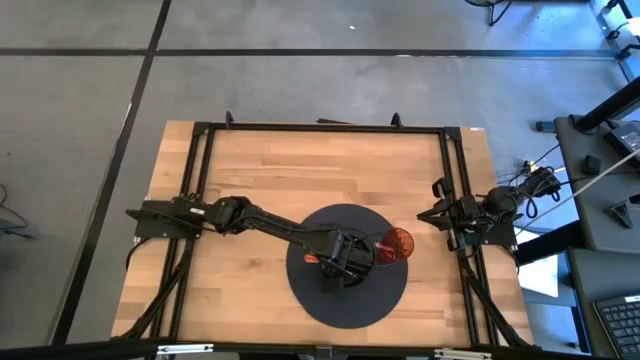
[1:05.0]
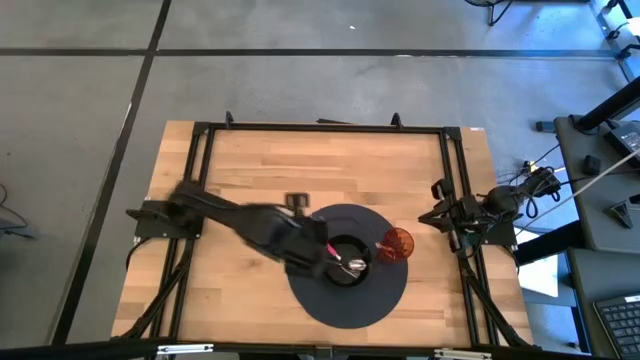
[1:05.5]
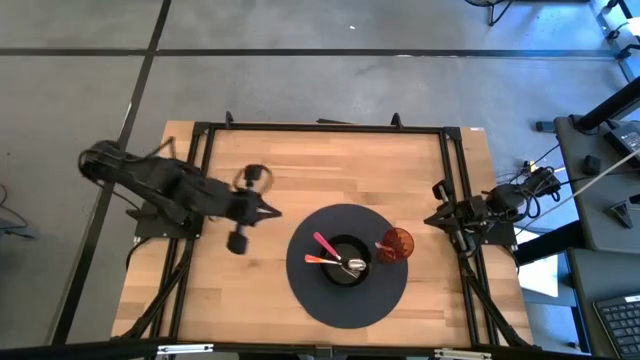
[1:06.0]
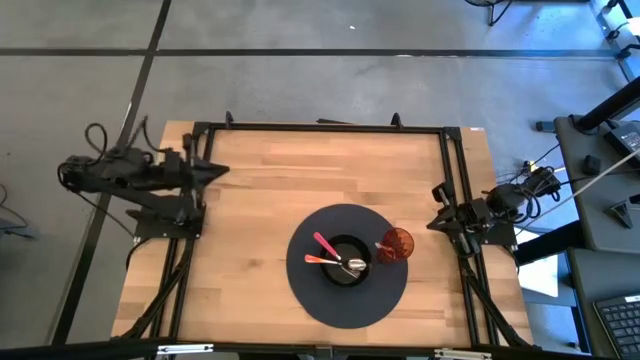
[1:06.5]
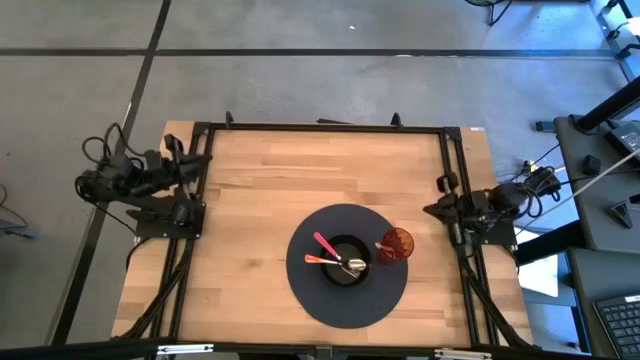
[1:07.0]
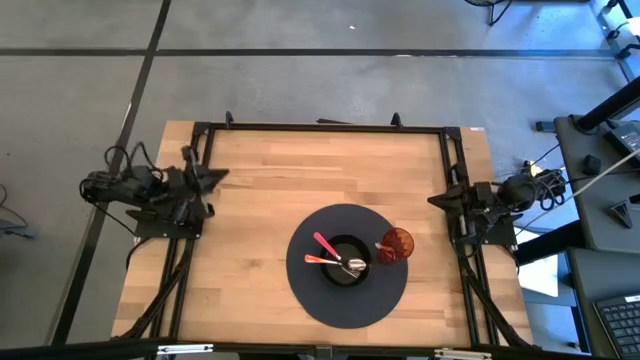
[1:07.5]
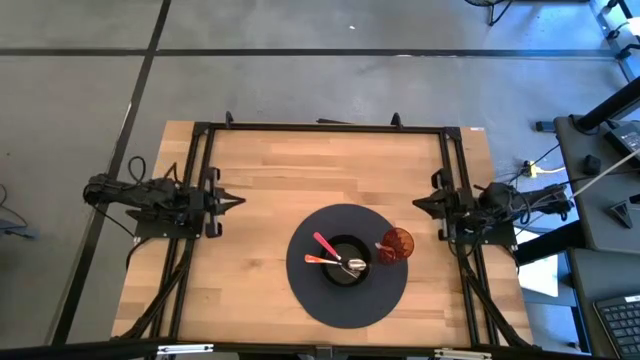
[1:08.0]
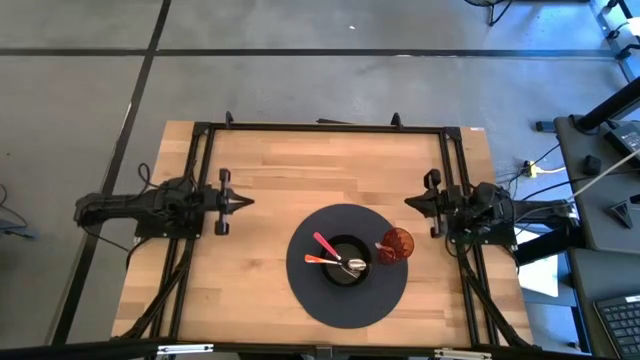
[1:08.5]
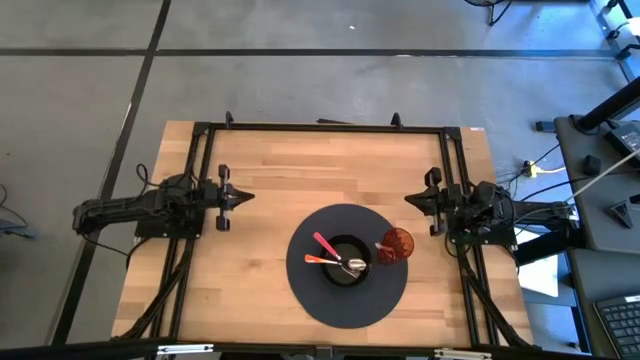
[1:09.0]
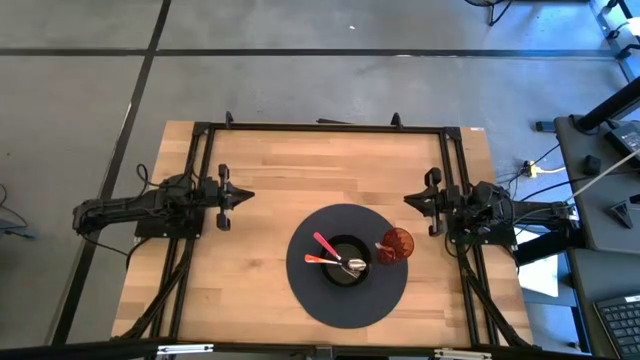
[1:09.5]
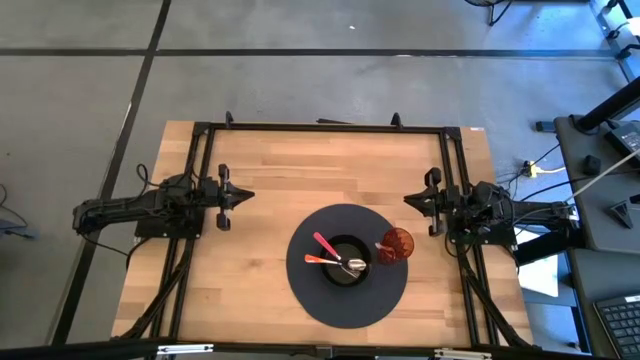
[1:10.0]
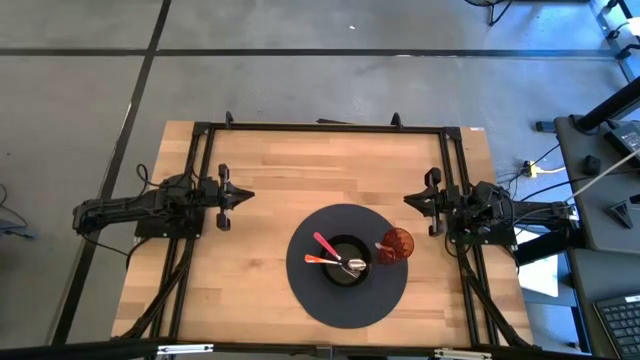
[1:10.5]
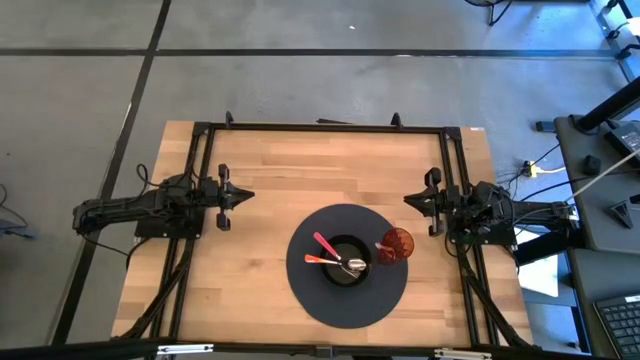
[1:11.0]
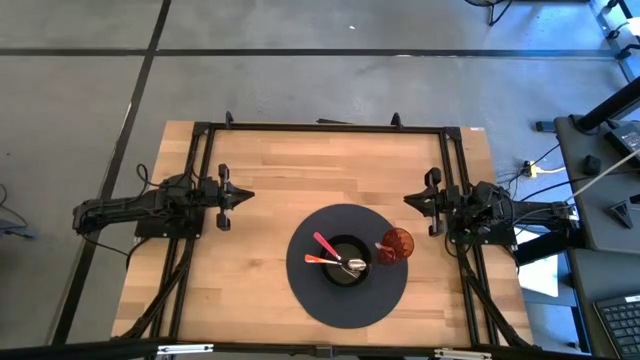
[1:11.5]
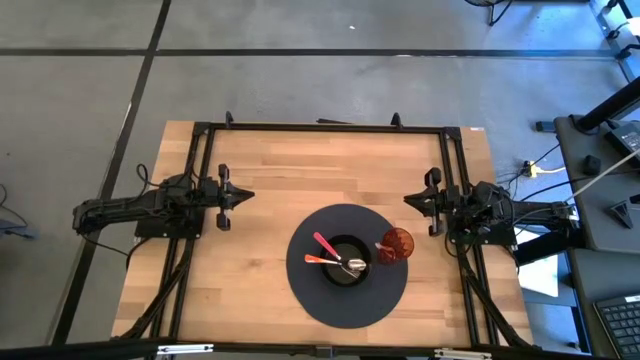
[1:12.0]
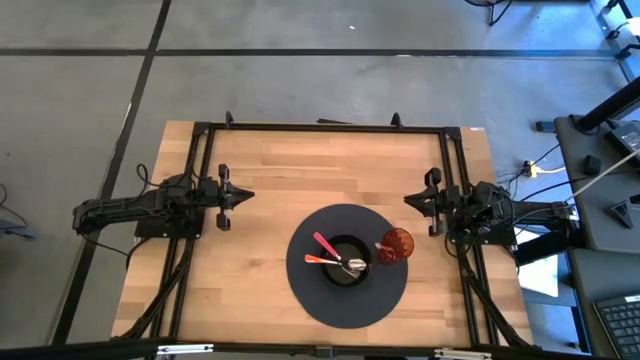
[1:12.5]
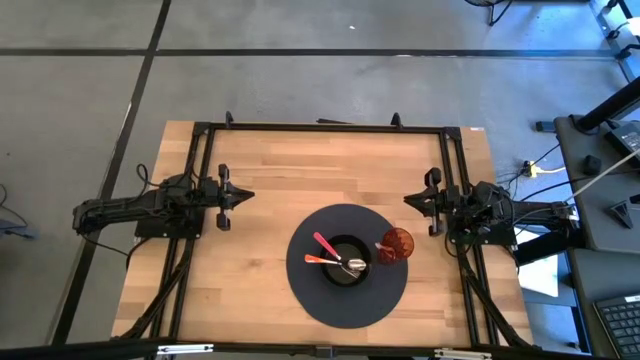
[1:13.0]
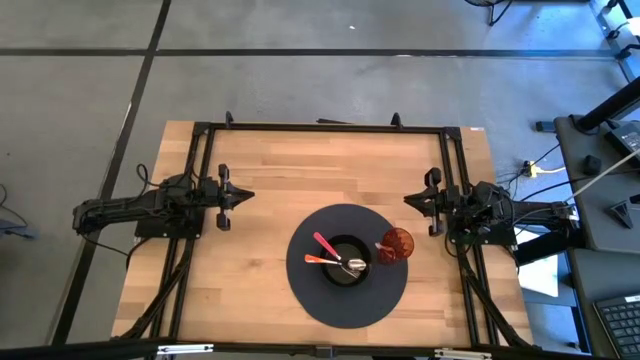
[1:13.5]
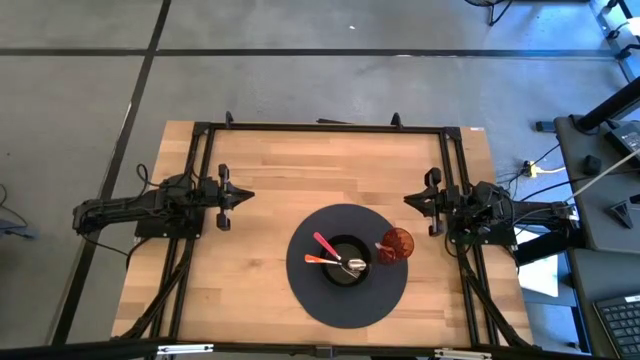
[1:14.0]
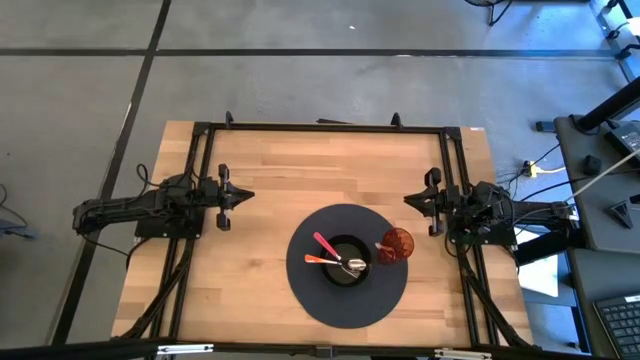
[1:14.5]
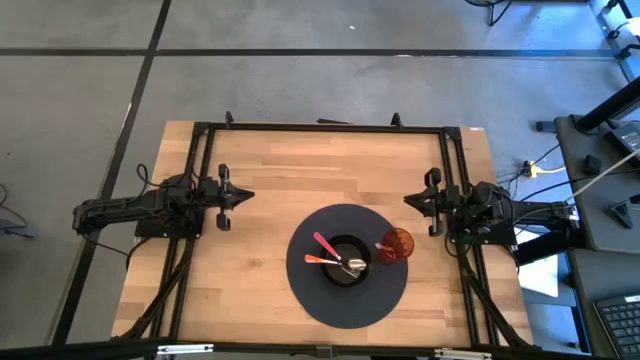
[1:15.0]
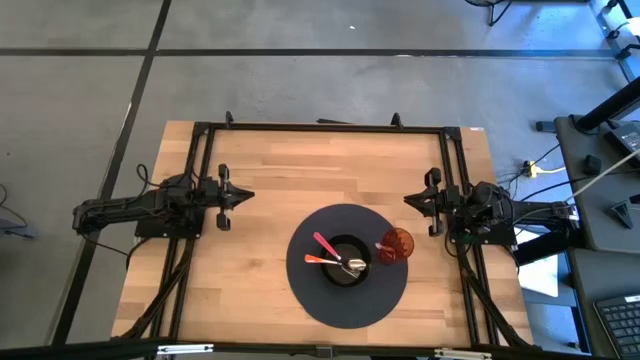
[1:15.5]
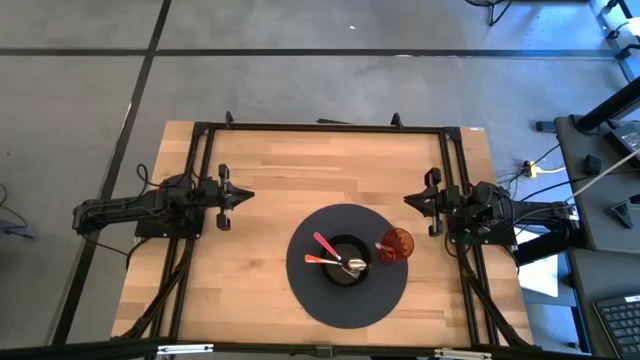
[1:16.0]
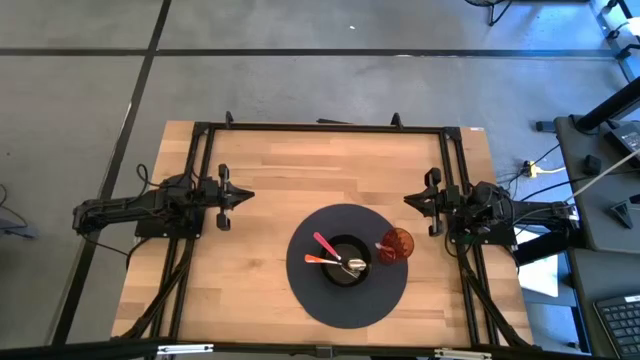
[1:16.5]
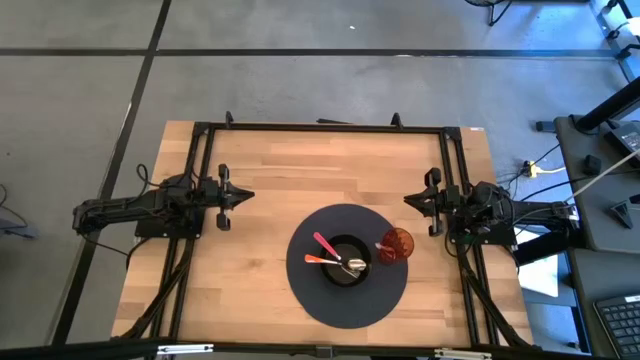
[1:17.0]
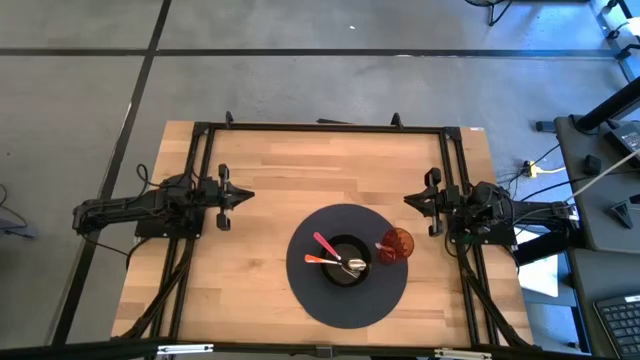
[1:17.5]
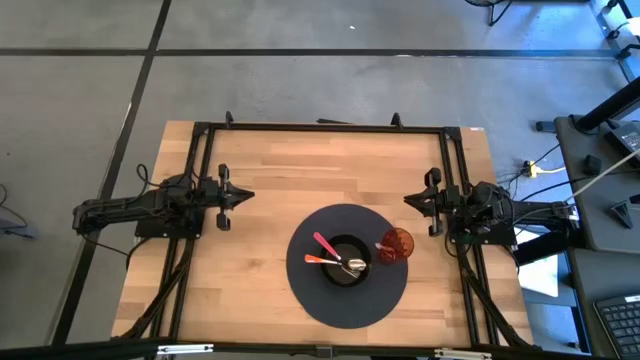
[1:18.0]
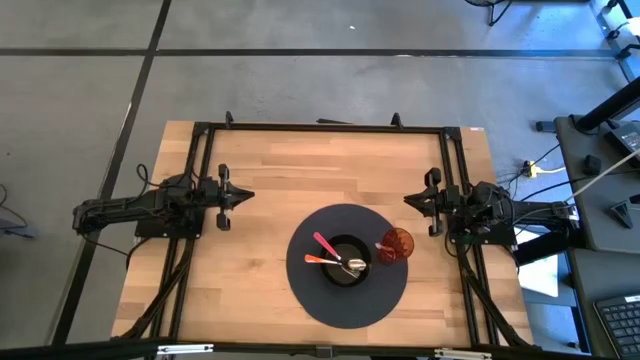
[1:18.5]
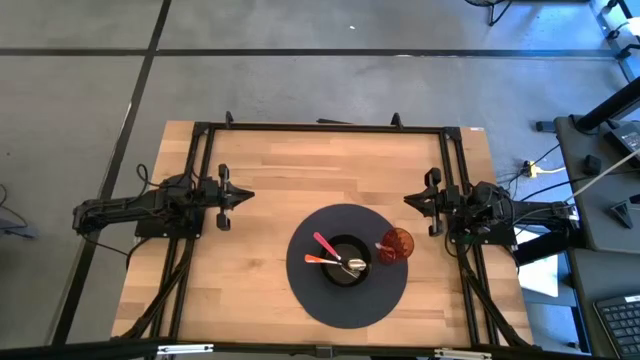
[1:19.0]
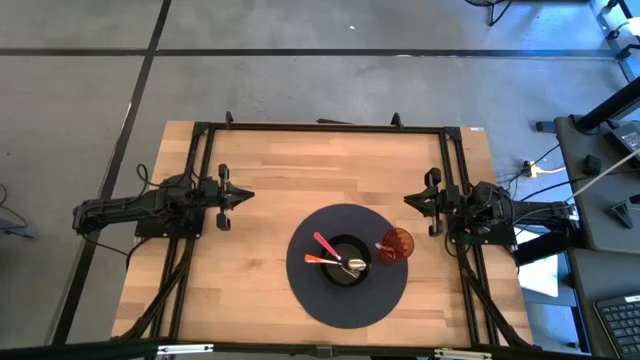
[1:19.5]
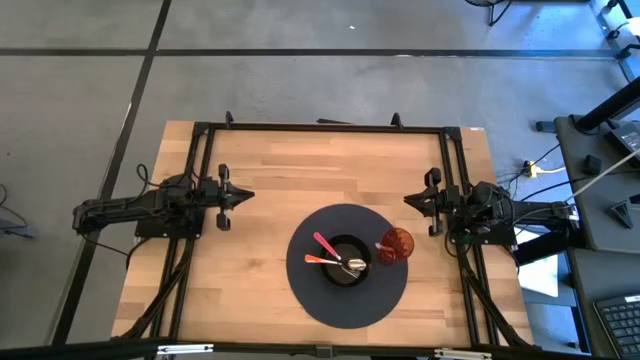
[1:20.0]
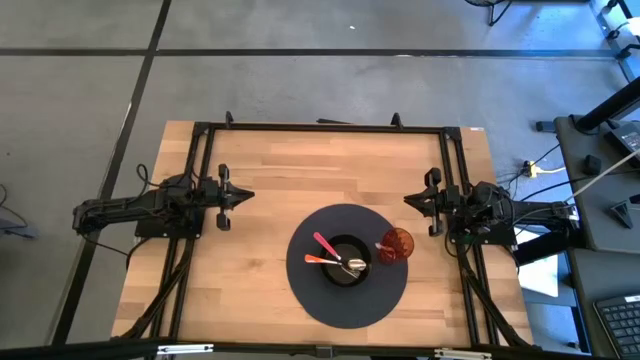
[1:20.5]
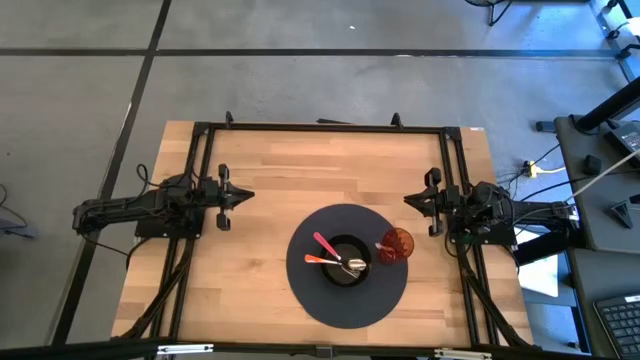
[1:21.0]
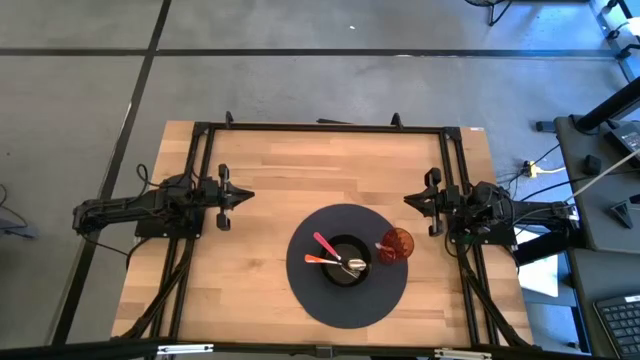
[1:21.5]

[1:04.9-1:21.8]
Task: Pick & Place Utensil
Return to Home Position

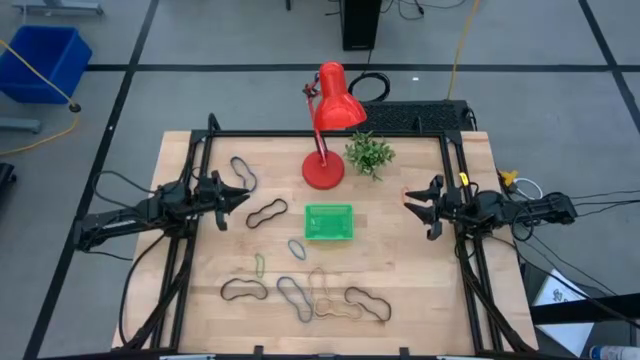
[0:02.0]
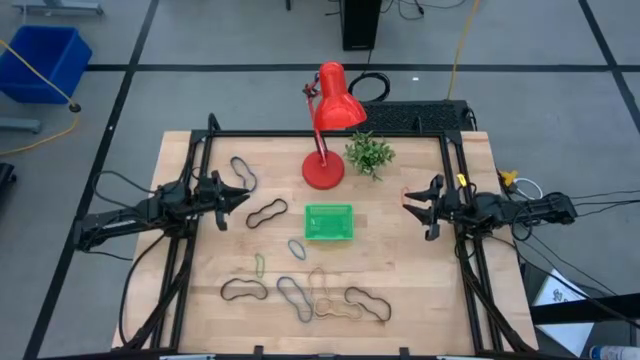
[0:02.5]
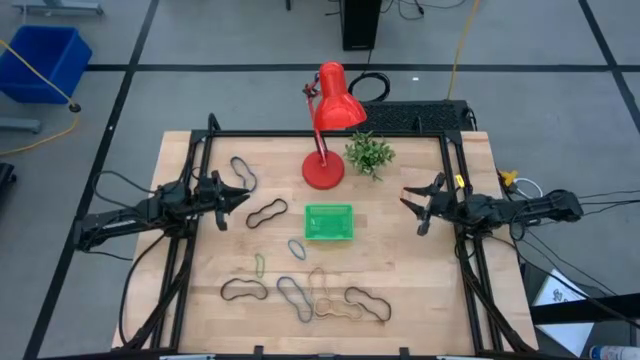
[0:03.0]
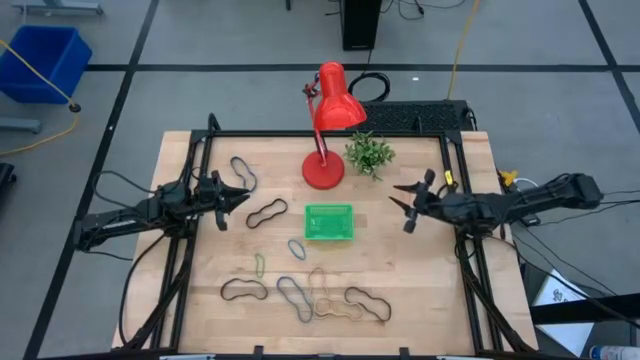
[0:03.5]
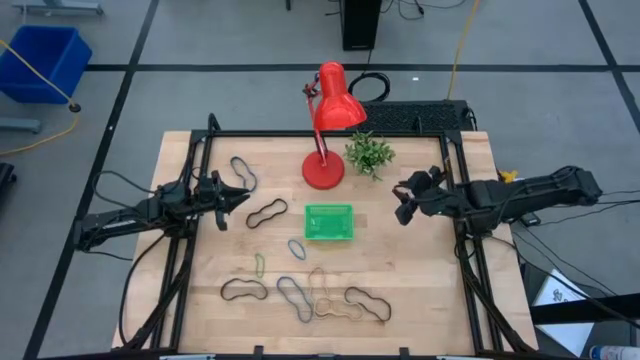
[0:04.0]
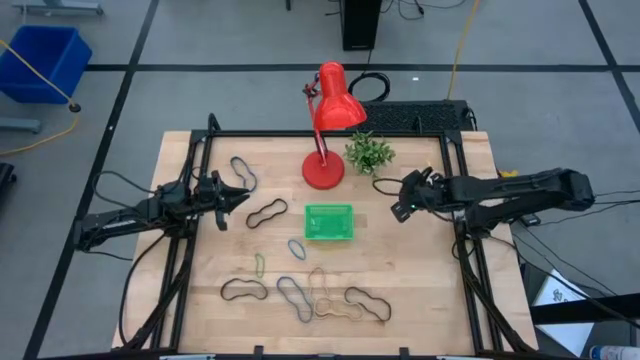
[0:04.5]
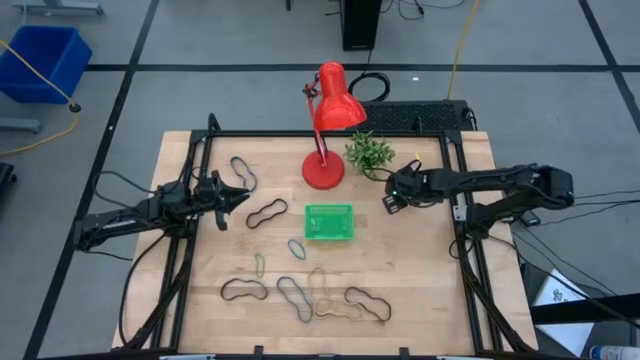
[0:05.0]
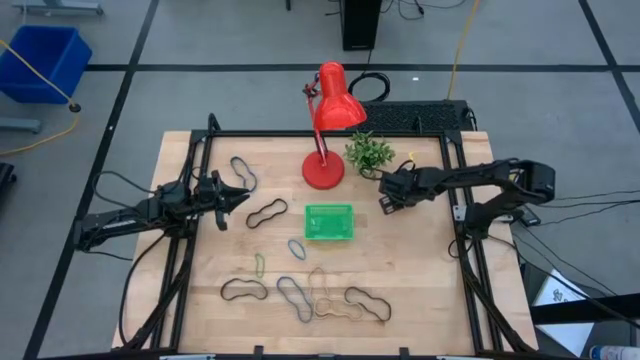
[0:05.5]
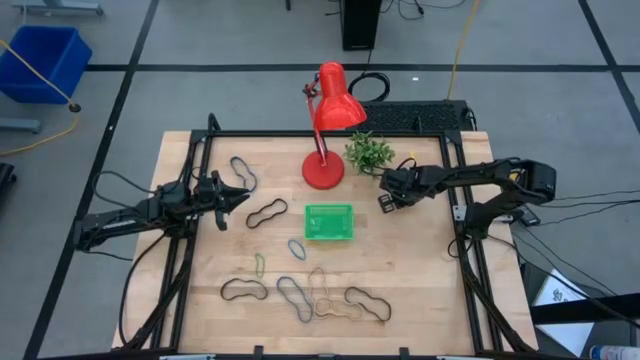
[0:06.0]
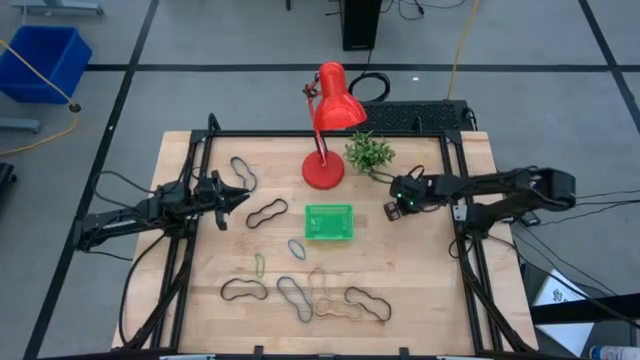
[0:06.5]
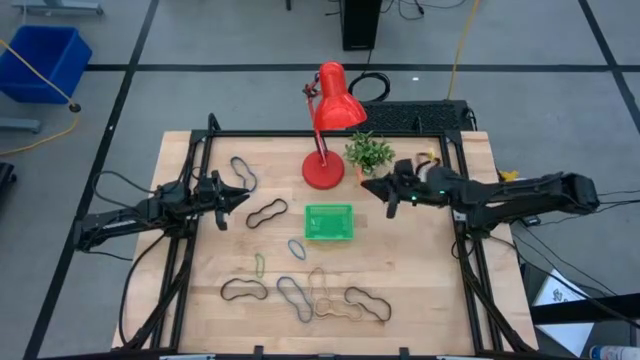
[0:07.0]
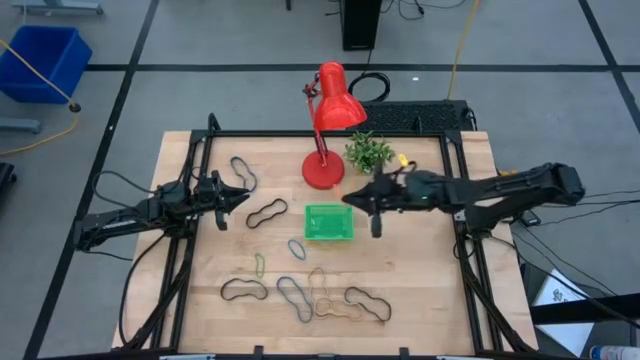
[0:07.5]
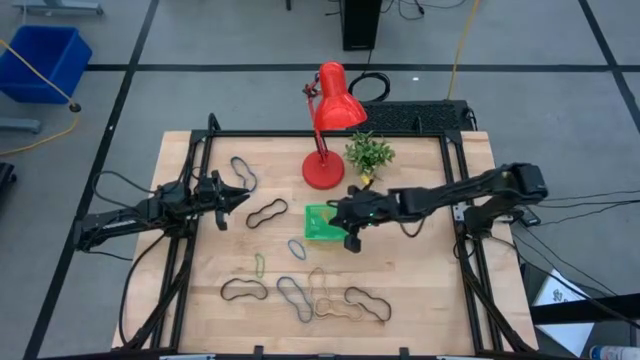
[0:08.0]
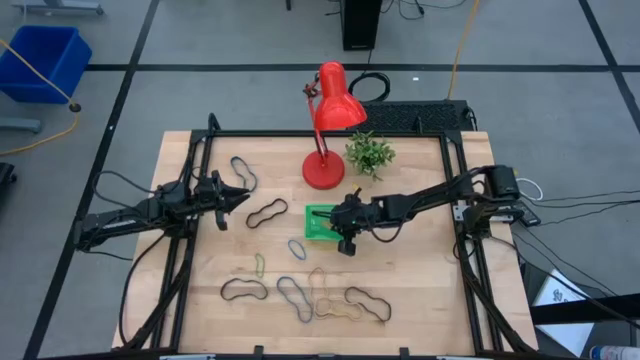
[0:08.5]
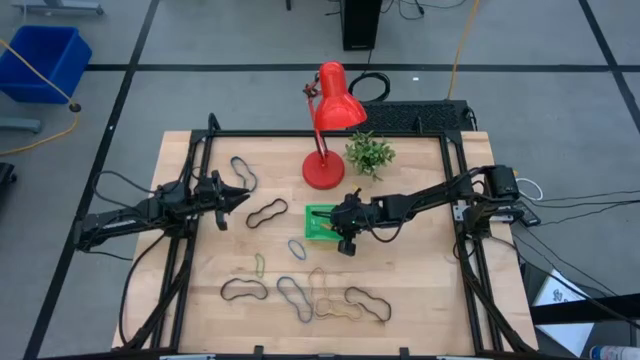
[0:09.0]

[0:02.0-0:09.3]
Task: Pick and place rubber bands into bin
Put the orange rubber band into the green bin
